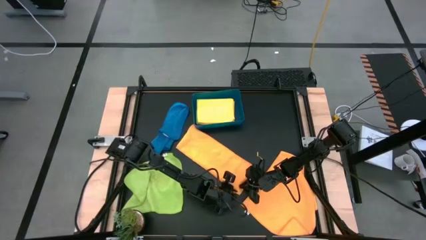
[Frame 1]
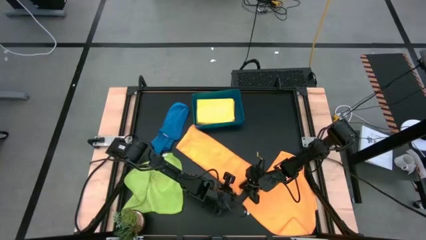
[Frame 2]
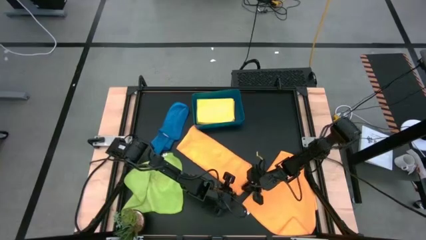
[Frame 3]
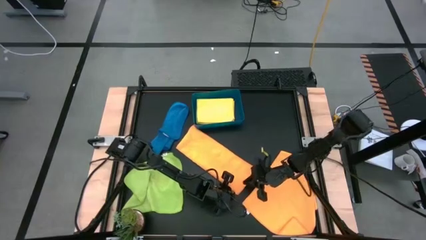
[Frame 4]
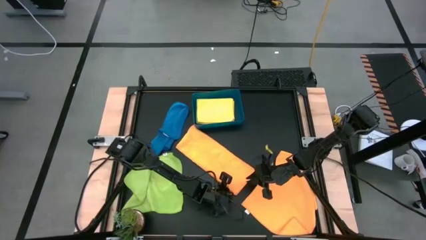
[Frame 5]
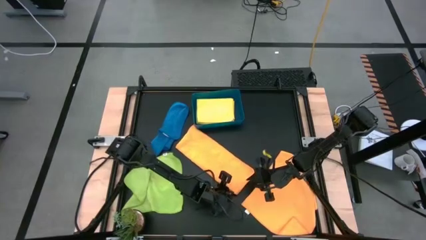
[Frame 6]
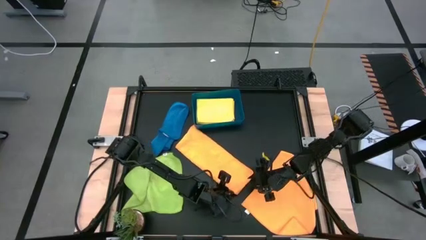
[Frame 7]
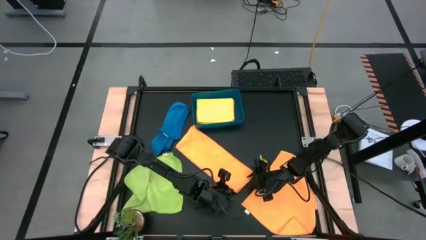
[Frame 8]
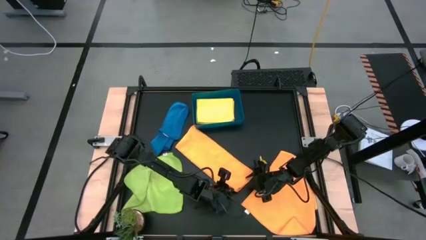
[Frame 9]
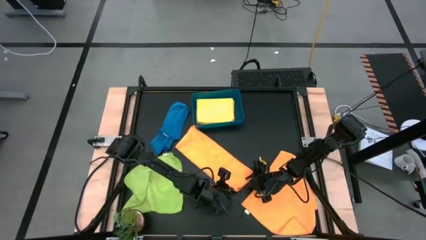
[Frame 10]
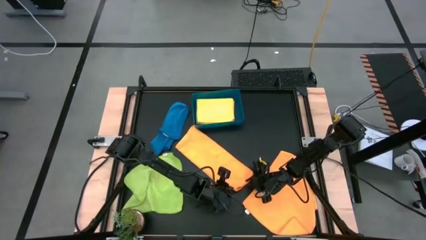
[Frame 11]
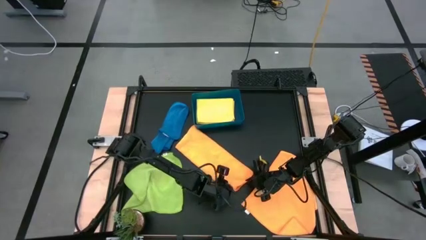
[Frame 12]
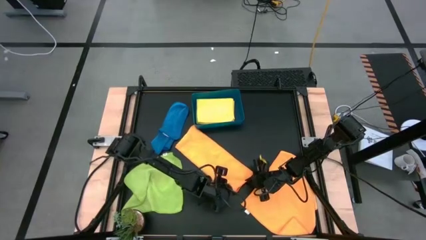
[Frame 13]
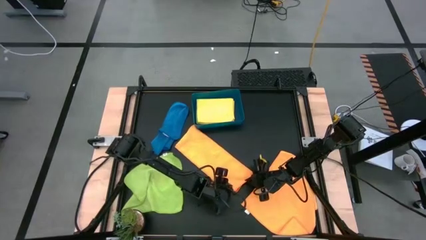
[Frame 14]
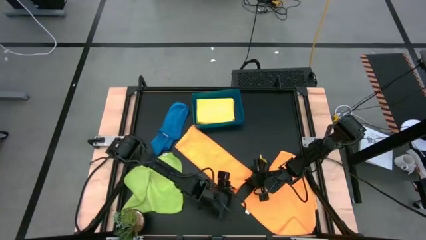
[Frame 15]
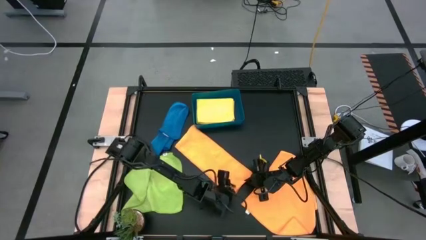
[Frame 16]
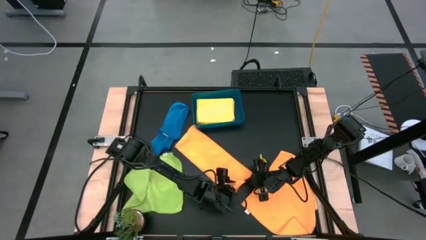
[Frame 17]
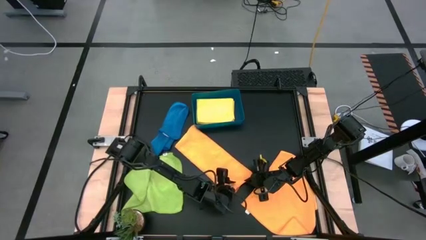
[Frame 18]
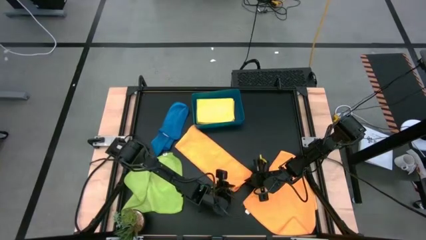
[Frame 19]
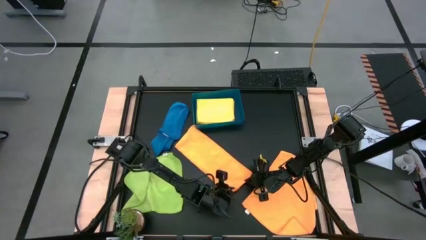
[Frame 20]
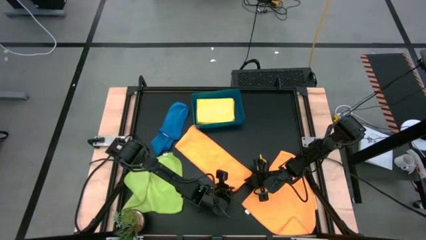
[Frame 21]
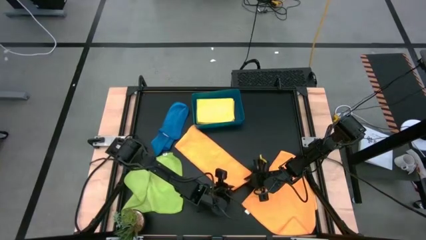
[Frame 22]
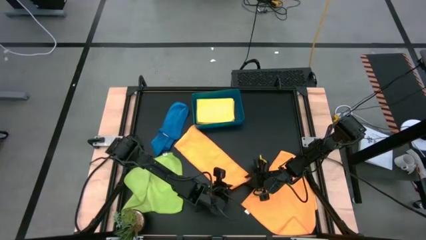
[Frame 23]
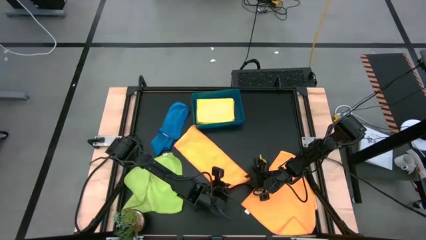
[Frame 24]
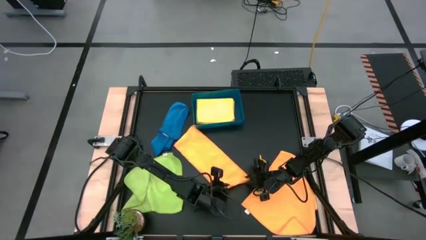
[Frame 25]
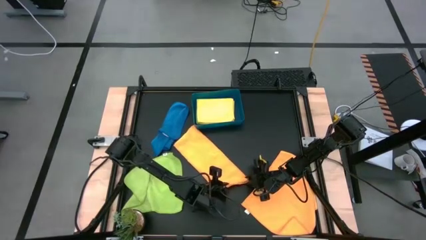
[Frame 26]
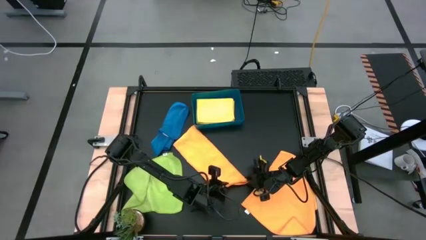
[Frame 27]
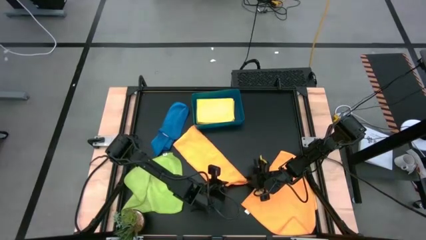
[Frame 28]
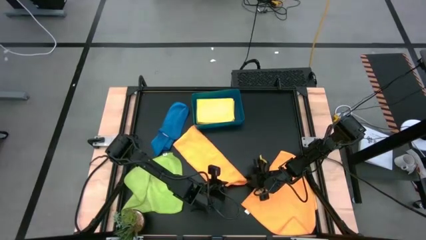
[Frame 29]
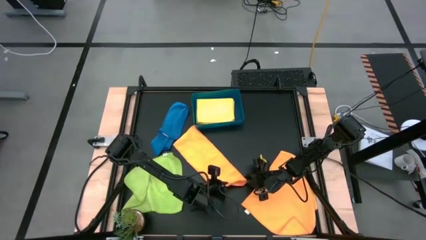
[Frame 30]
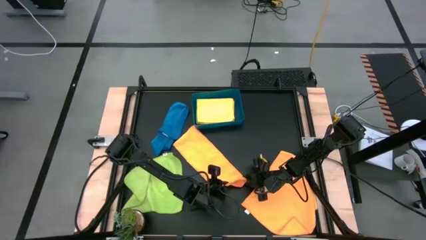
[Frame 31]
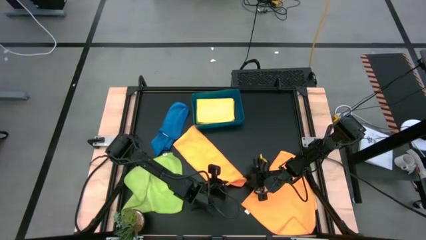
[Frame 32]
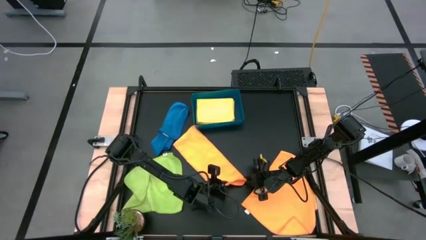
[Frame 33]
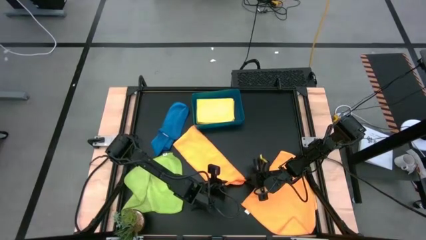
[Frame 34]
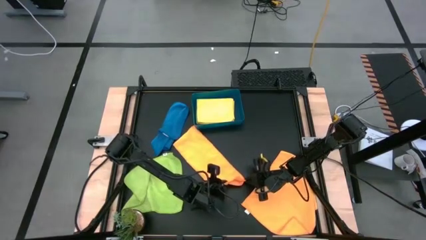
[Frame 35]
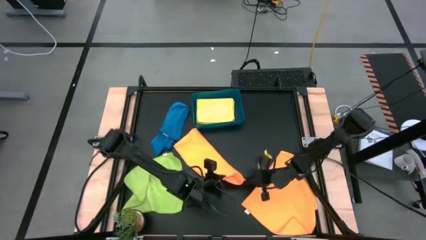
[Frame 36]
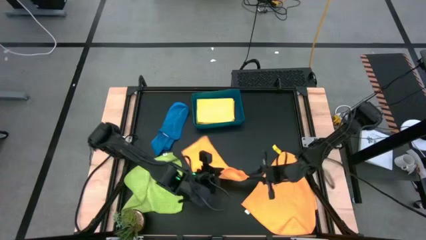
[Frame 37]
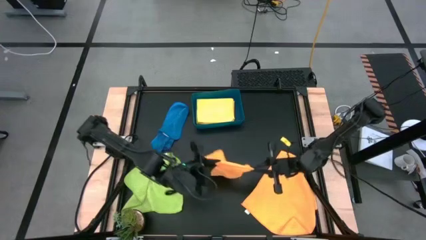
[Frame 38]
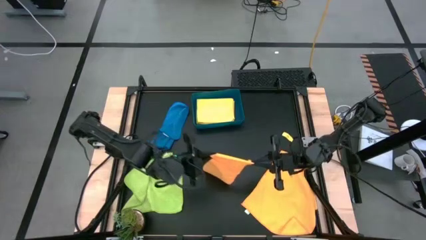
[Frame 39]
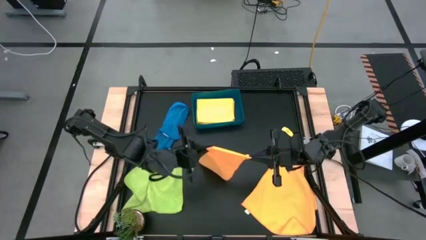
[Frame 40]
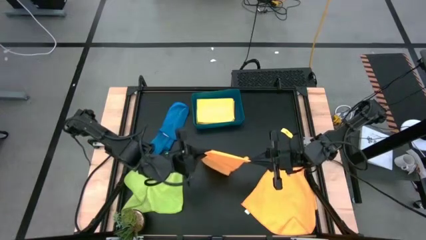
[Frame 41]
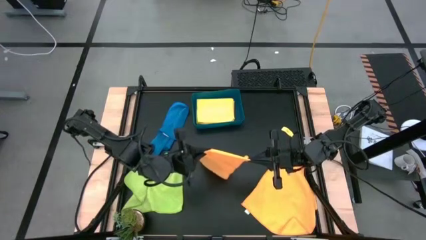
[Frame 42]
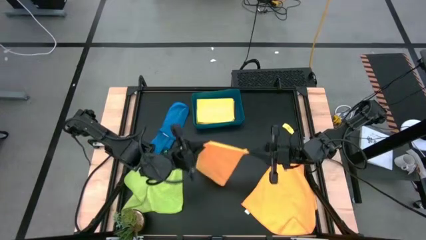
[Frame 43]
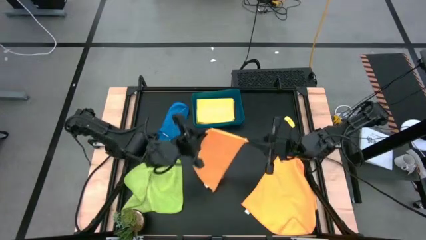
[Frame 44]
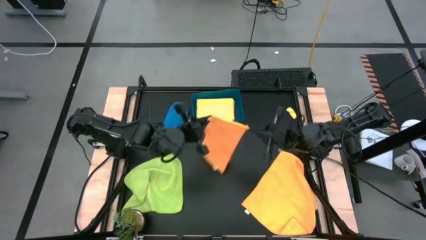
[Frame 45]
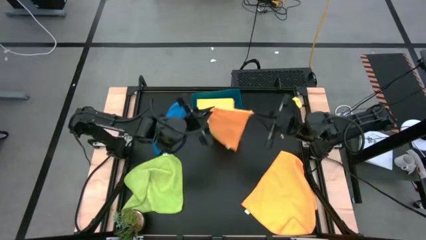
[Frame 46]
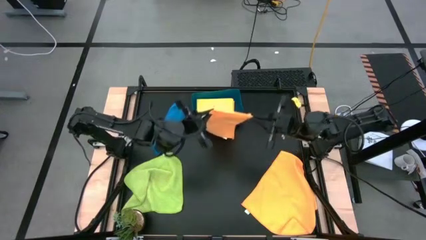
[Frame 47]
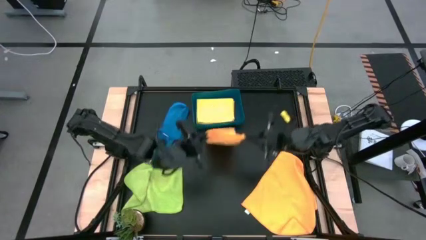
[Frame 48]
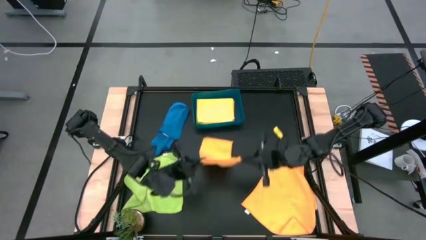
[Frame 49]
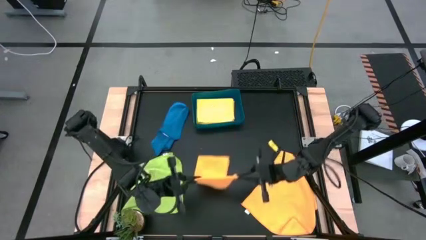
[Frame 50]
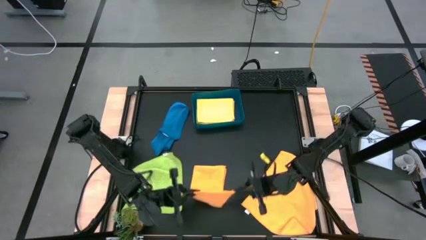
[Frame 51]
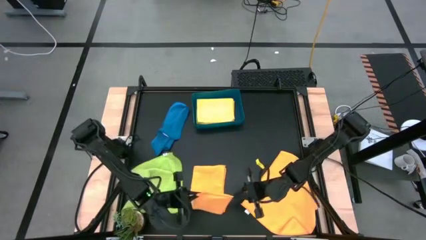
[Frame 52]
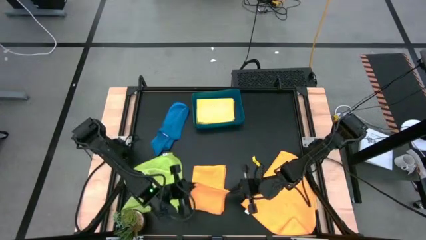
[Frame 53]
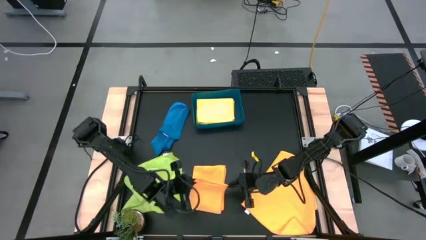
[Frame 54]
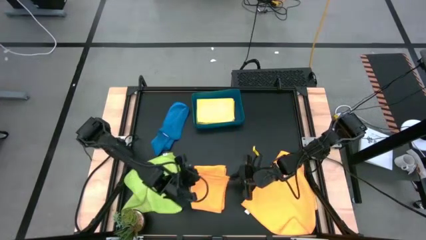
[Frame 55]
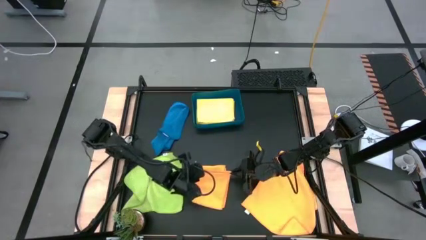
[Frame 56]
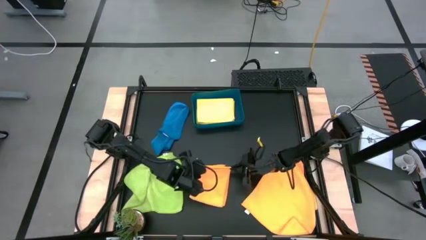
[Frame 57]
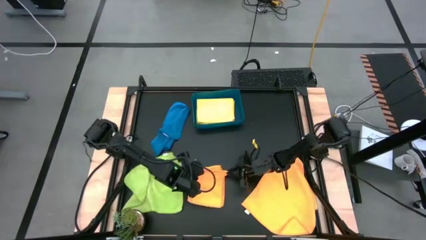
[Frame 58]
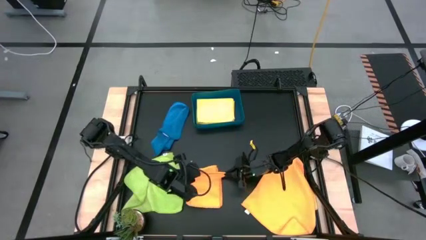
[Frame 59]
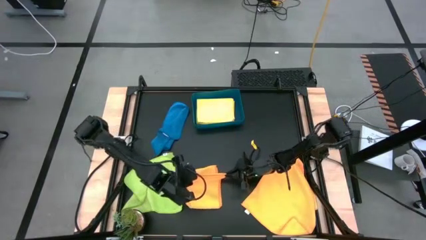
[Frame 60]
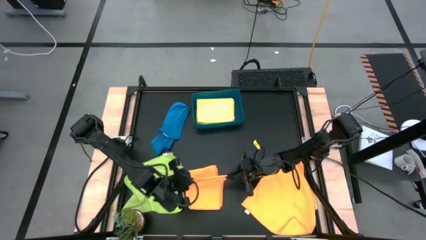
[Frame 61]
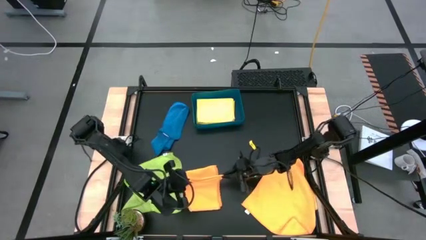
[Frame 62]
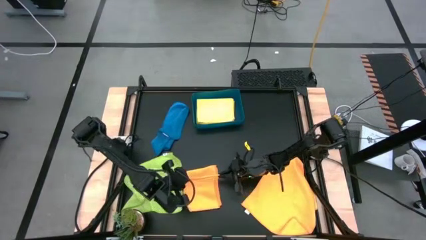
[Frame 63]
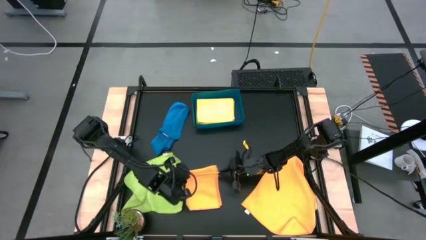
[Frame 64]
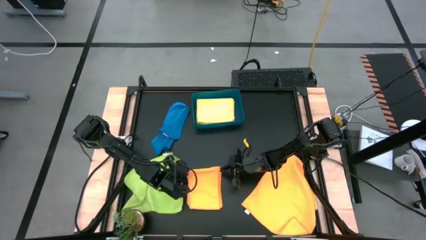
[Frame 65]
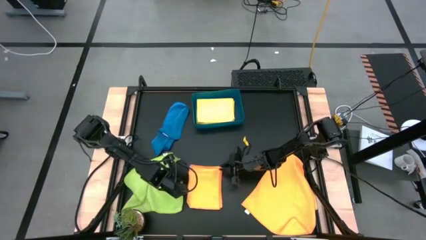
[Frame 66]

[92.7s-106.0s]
Task: Fold microfiber towels
Fold the top orange microfiber cloth
